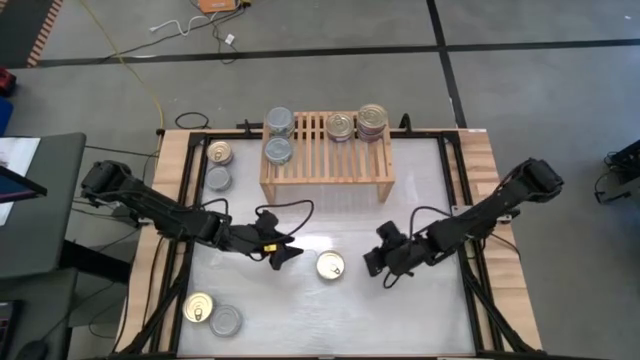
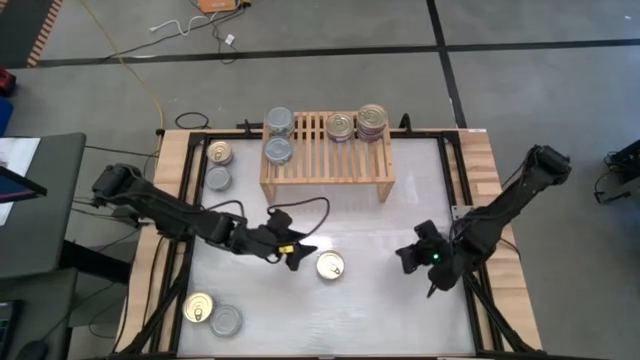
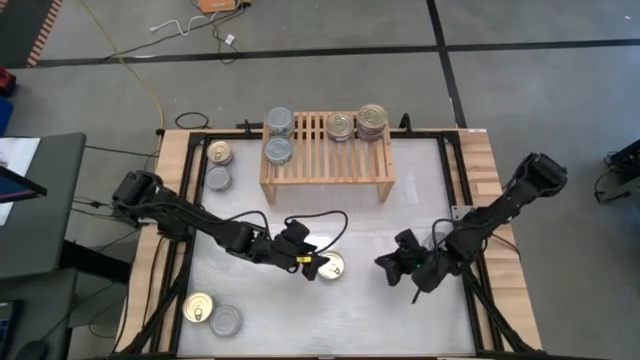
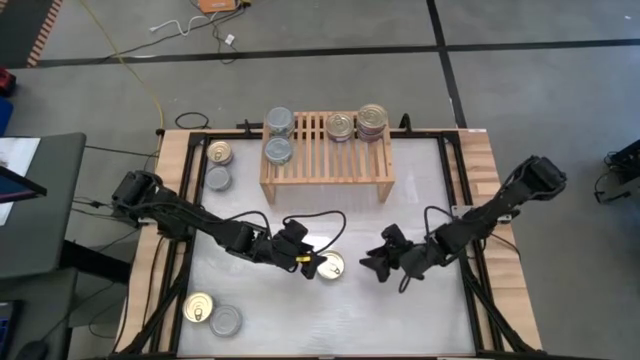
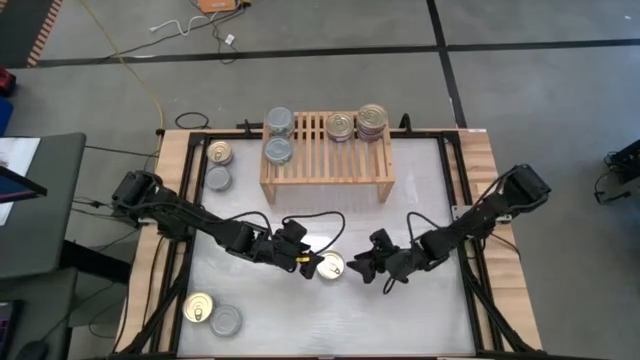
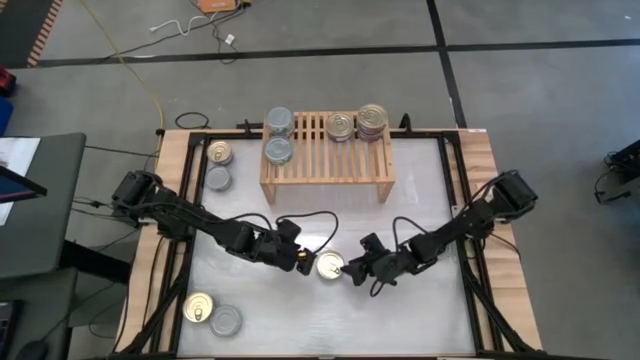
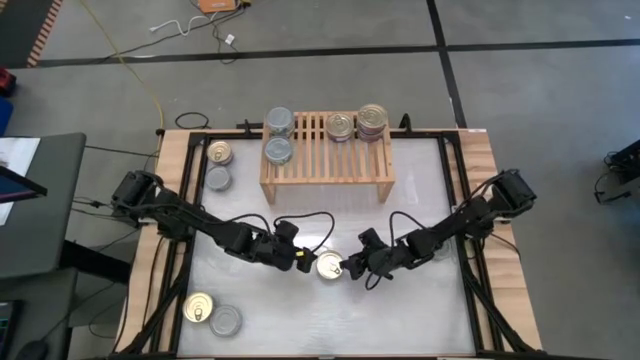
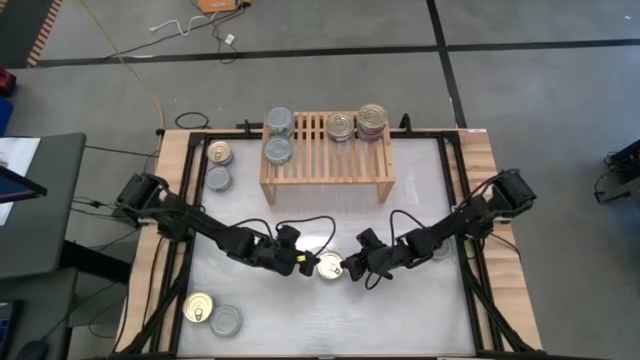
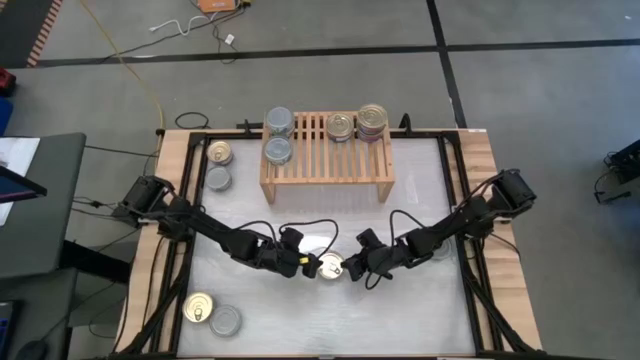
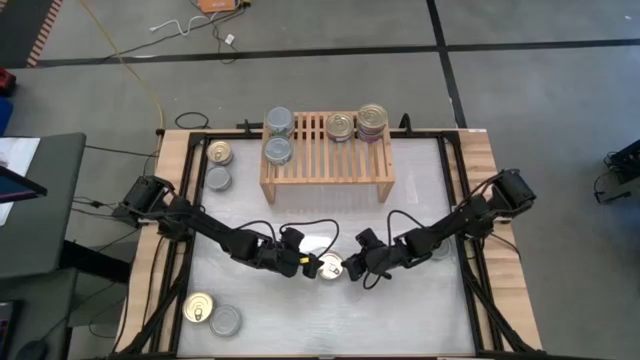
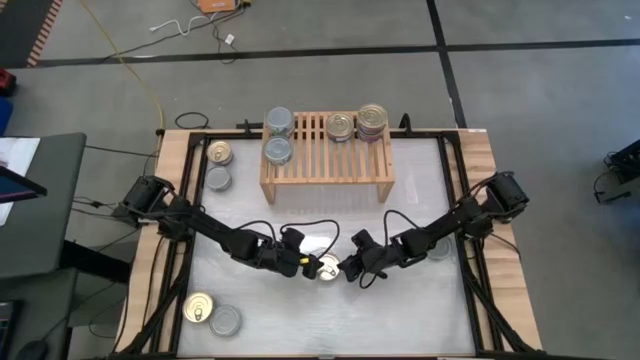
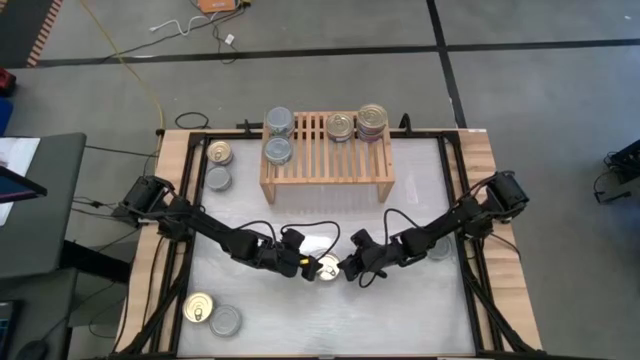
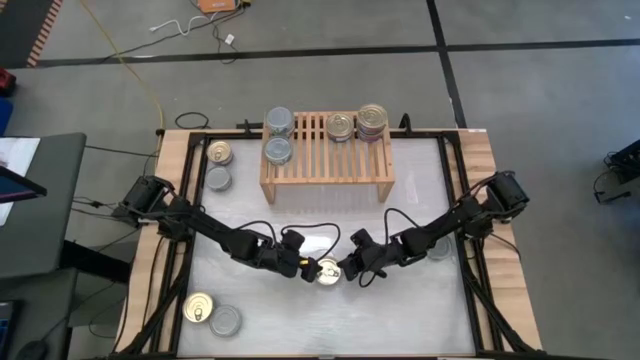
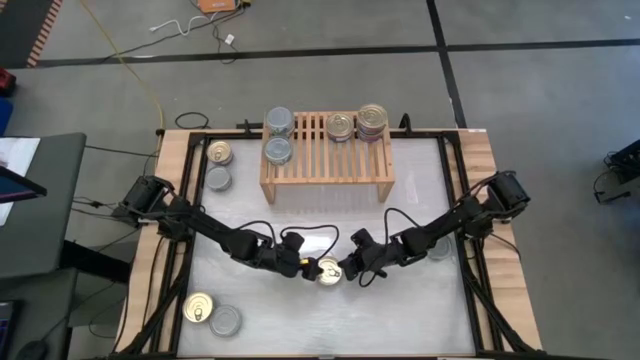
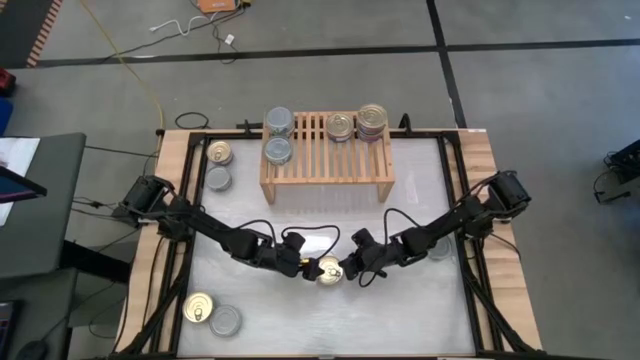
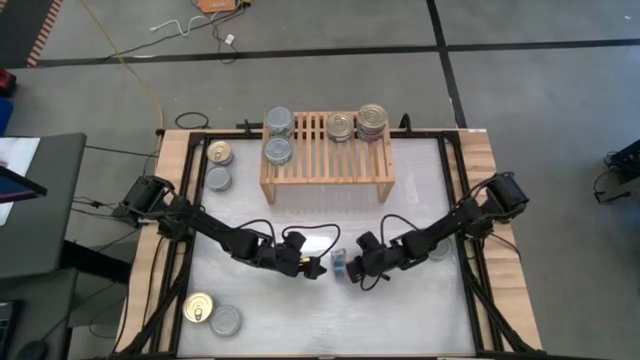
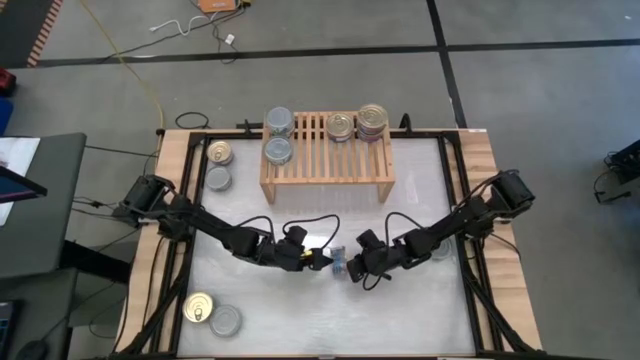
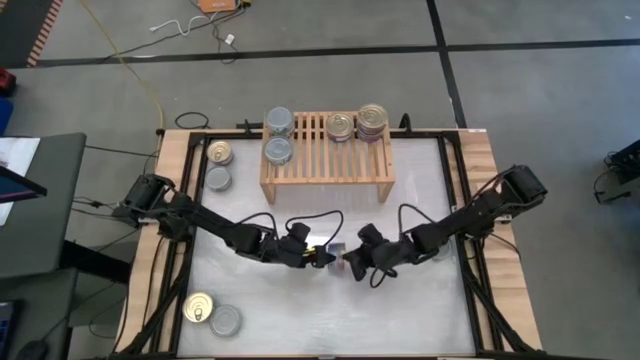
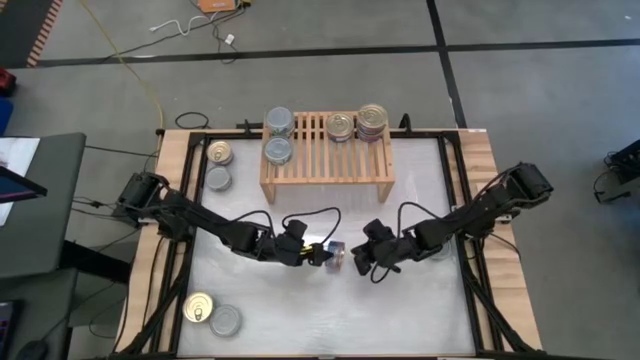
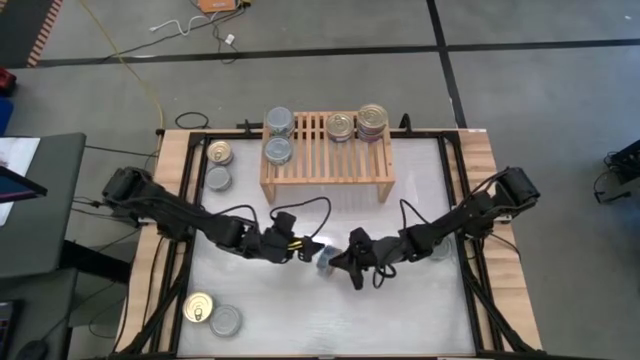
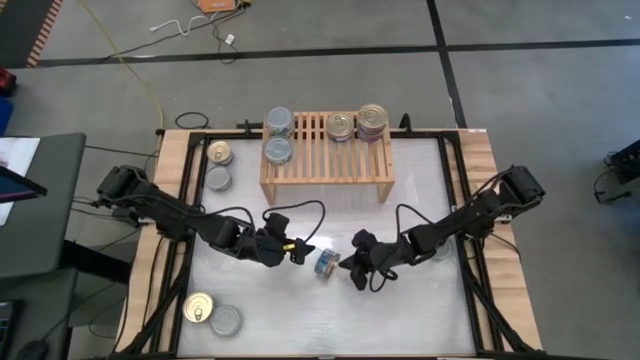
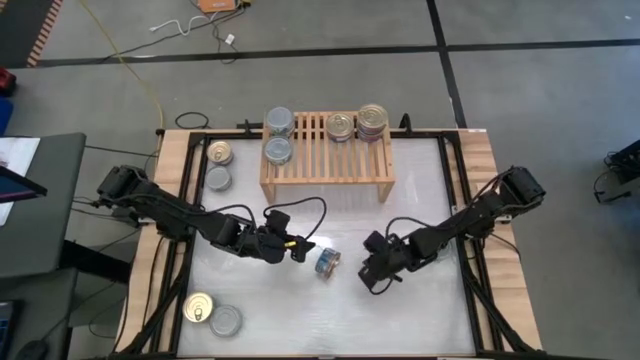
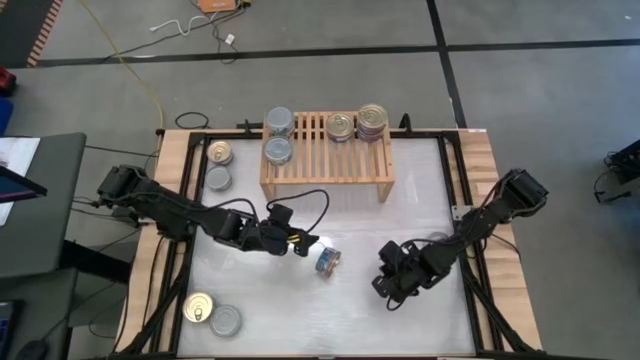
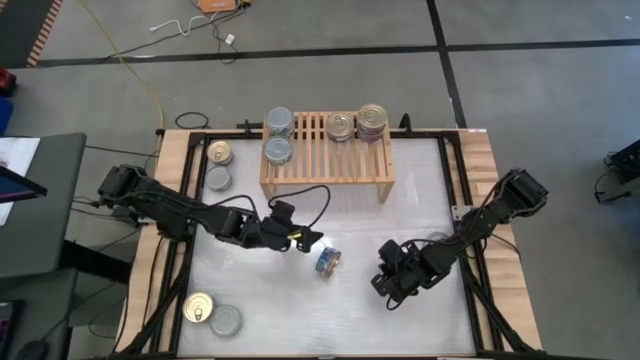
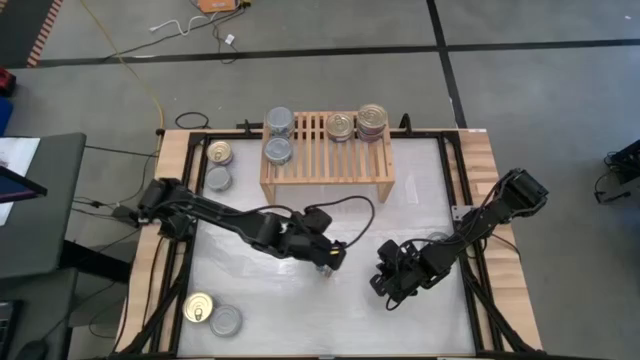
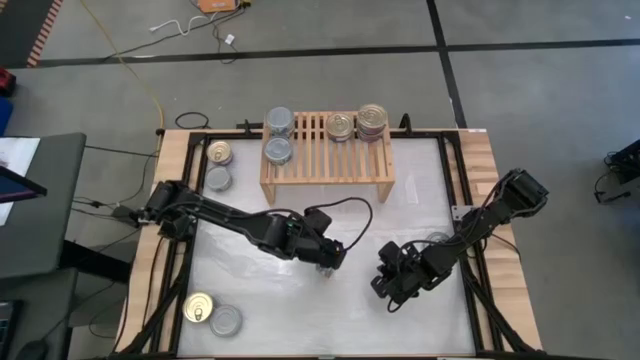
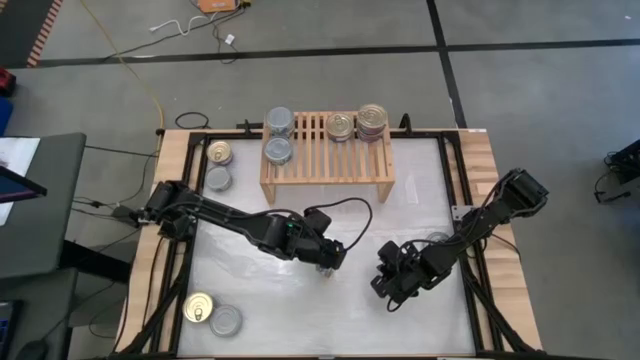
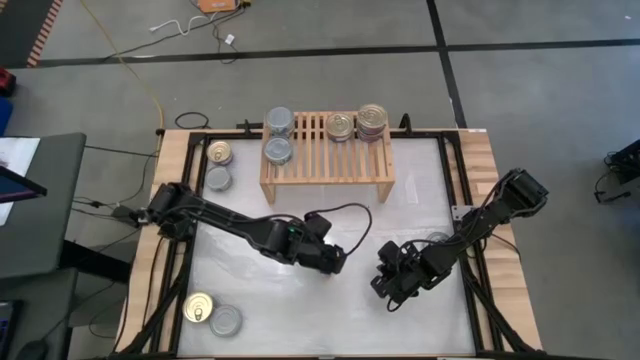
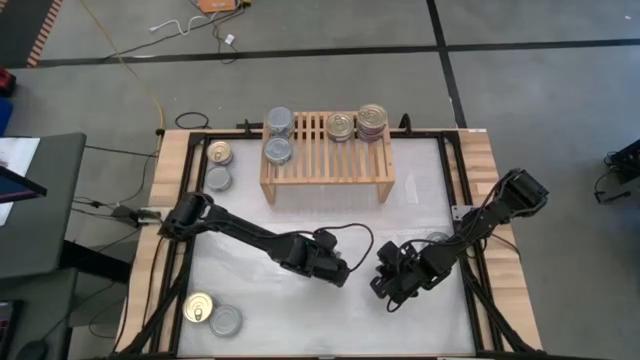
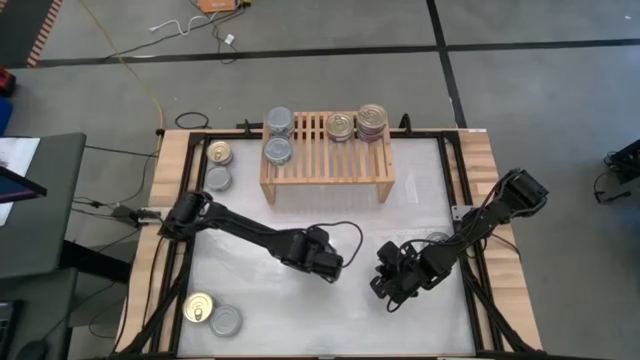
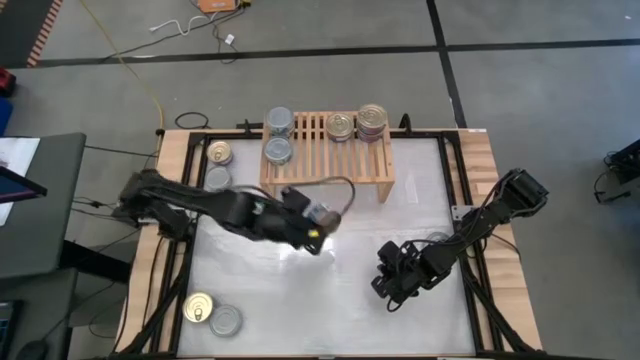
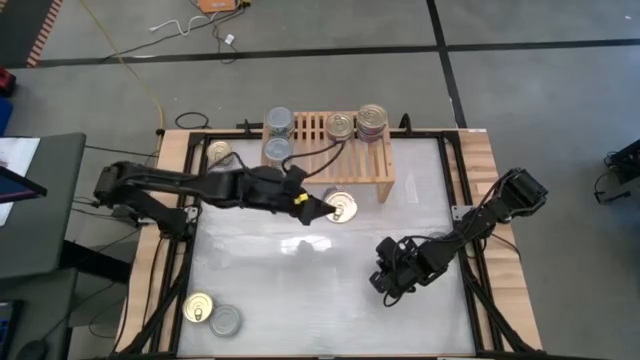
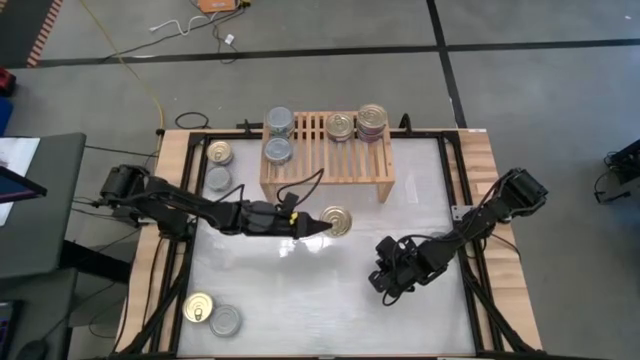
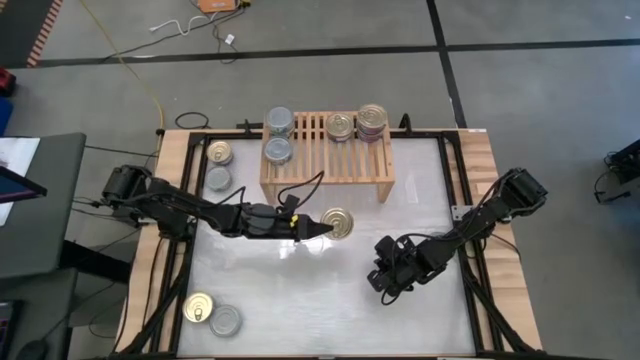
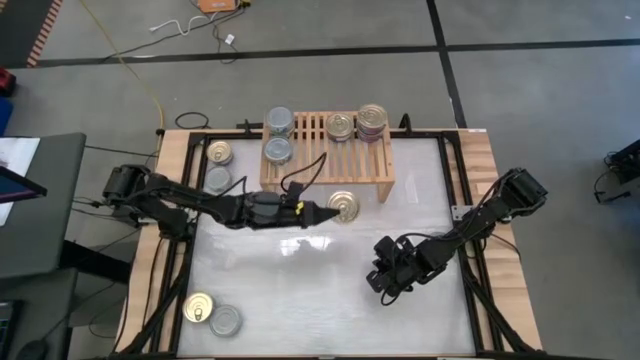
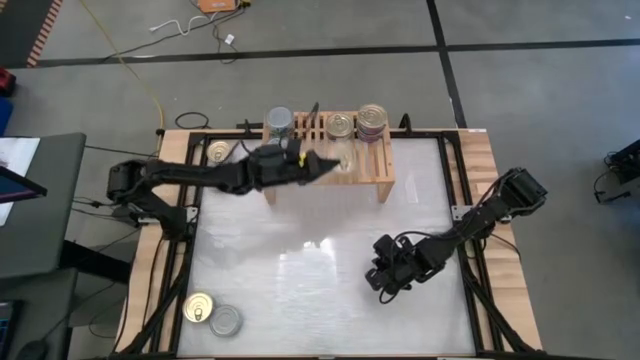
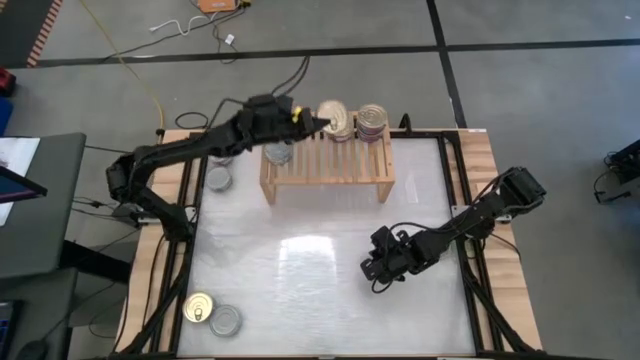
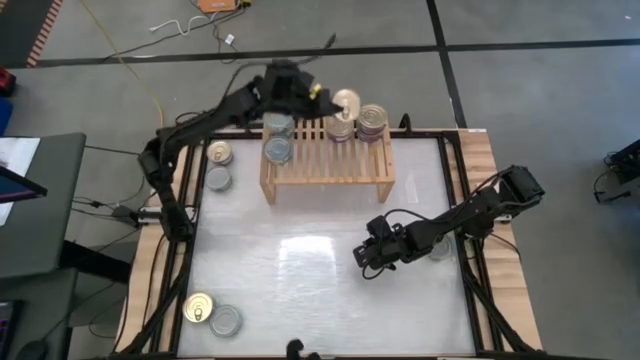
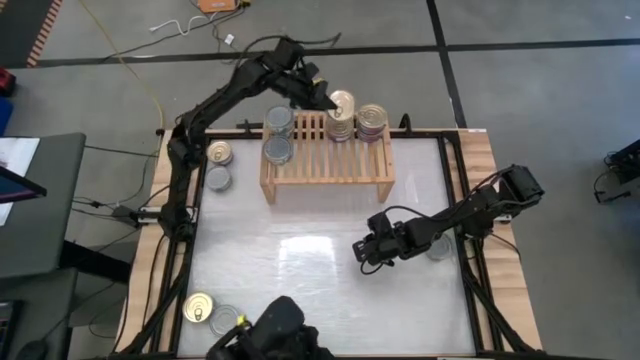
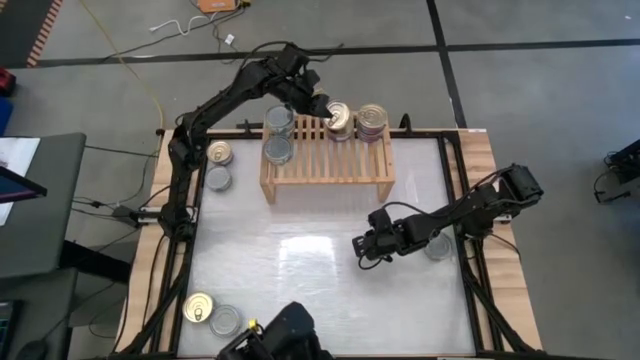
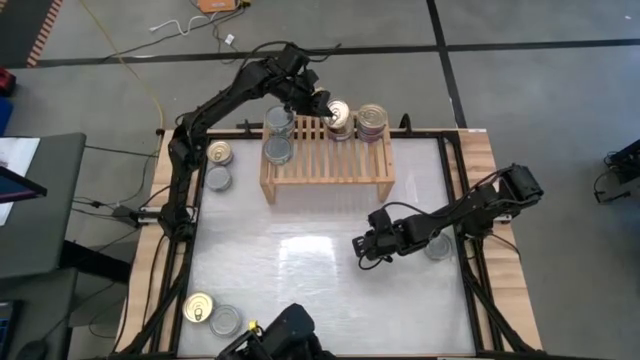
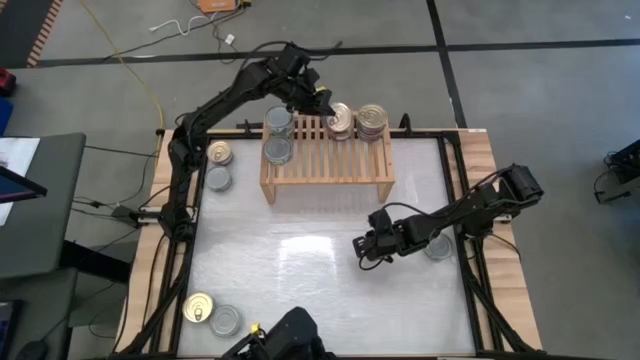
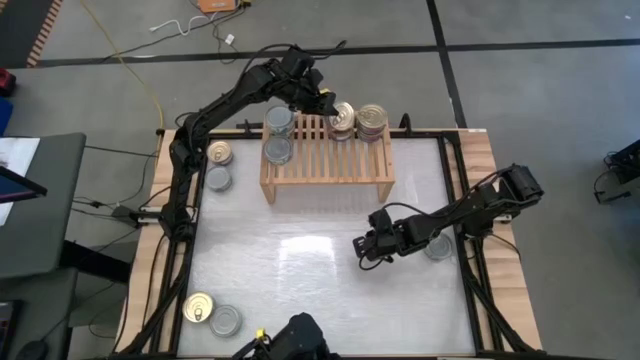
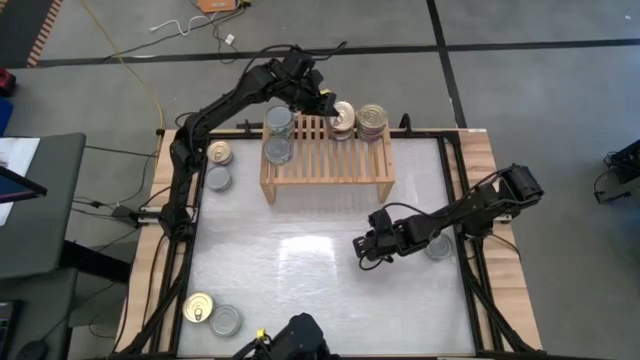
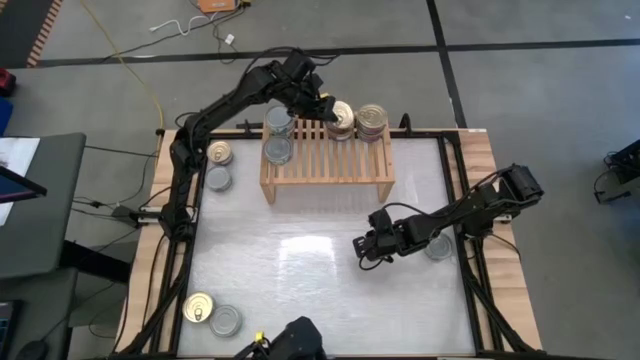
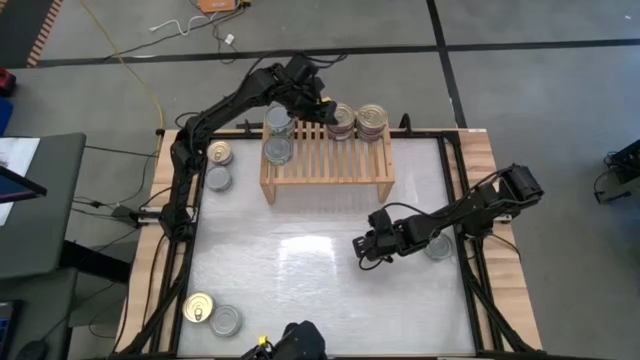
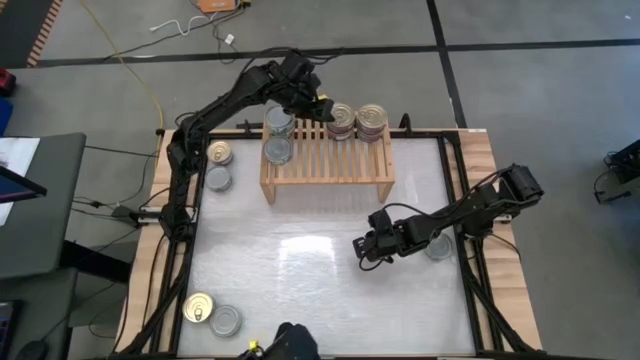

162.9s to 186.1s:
Task: Stack canned seafood by type on shelf
Stack the blue tuna can on top of the blue tuna can on the shelf
